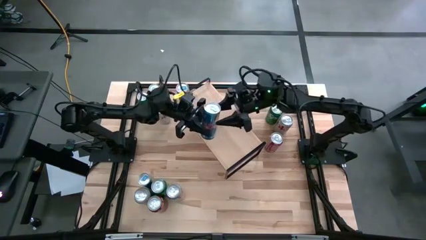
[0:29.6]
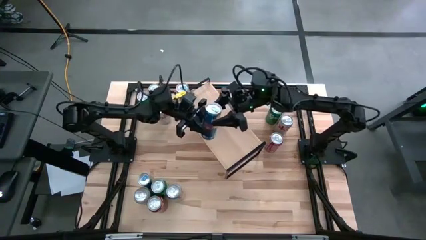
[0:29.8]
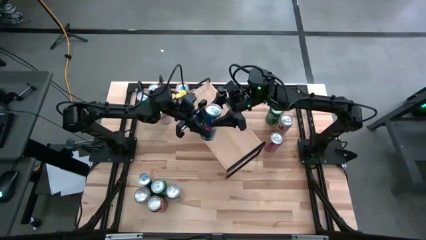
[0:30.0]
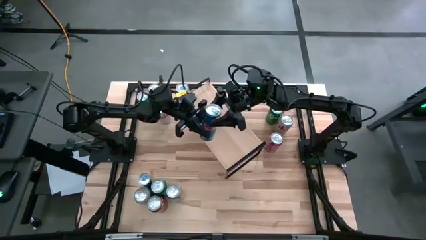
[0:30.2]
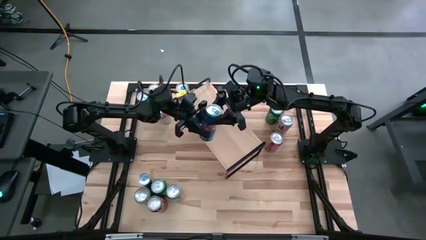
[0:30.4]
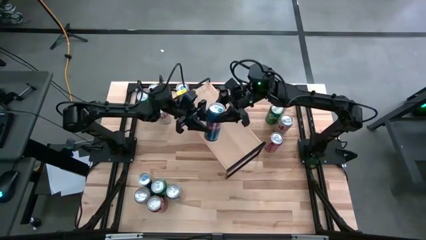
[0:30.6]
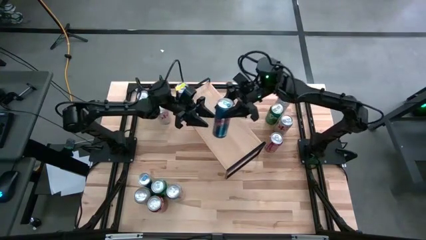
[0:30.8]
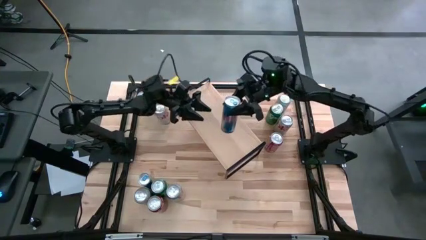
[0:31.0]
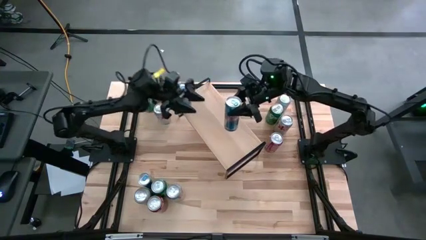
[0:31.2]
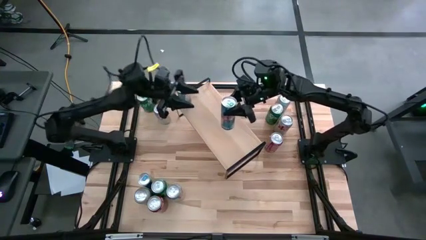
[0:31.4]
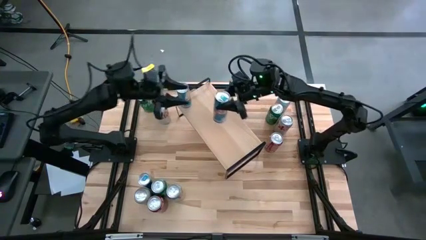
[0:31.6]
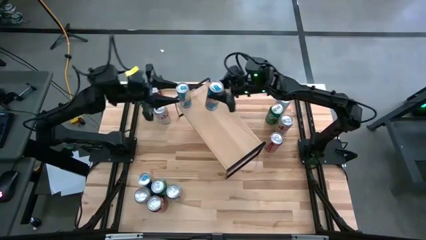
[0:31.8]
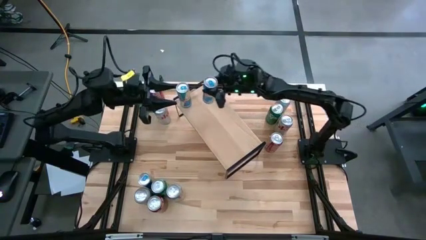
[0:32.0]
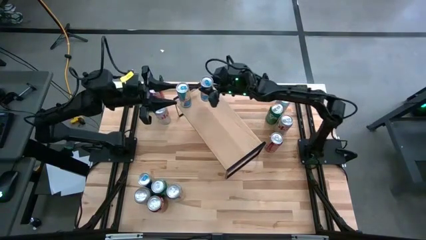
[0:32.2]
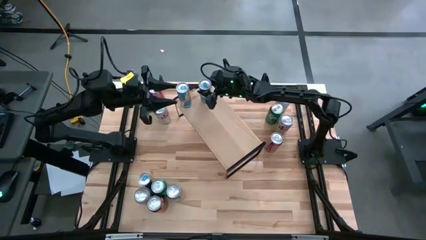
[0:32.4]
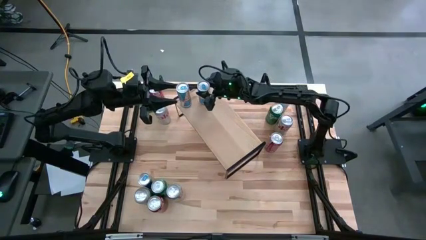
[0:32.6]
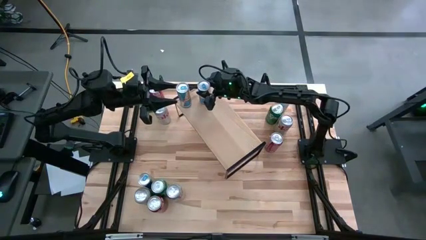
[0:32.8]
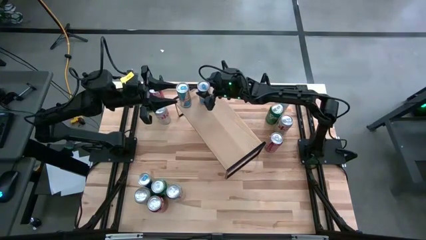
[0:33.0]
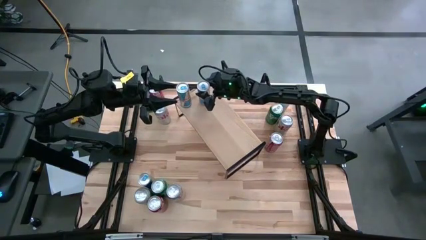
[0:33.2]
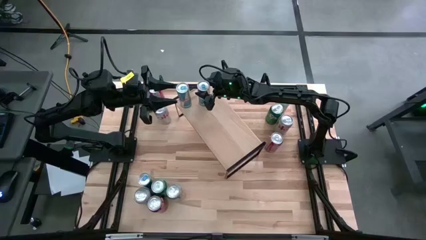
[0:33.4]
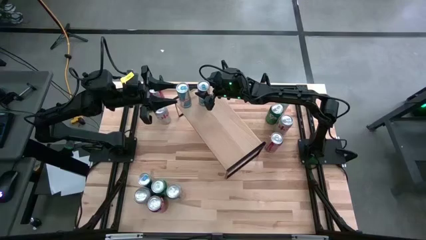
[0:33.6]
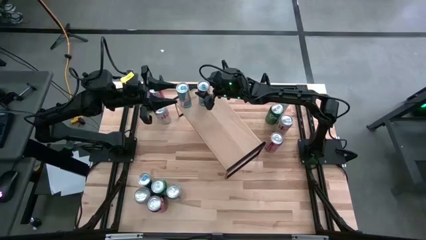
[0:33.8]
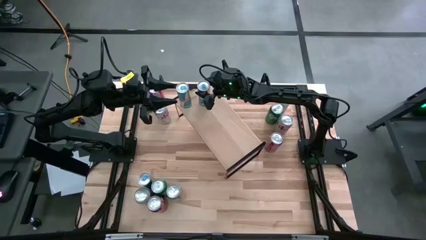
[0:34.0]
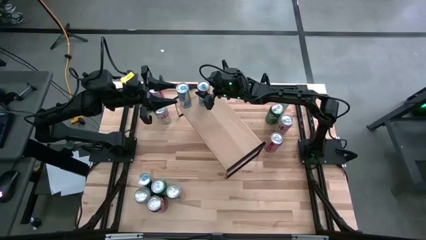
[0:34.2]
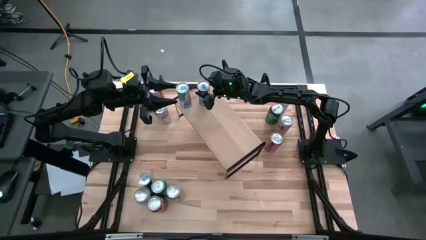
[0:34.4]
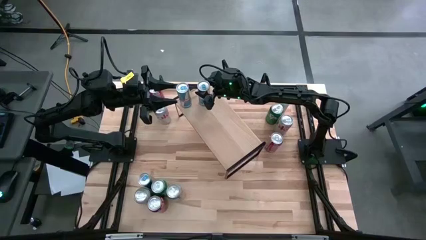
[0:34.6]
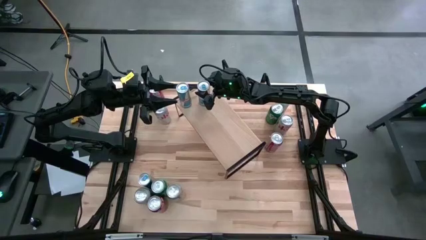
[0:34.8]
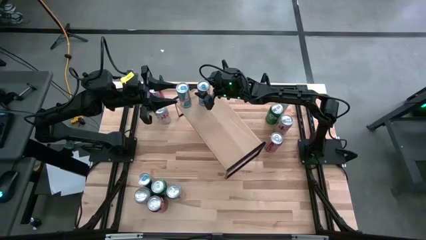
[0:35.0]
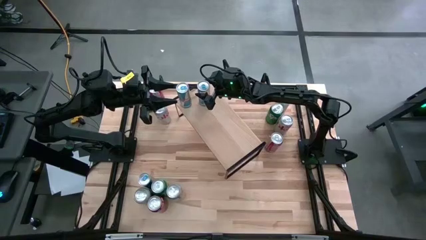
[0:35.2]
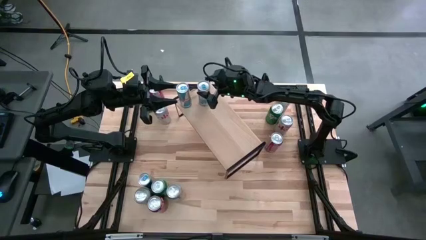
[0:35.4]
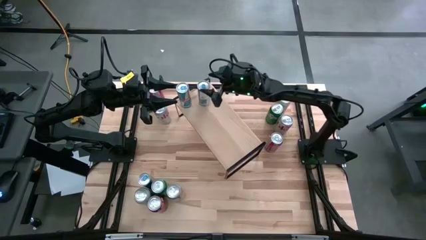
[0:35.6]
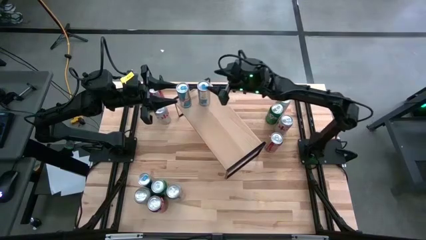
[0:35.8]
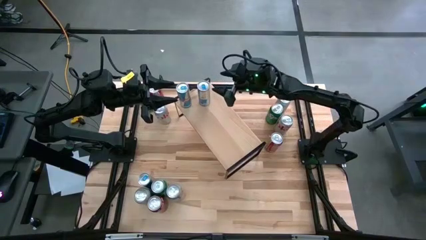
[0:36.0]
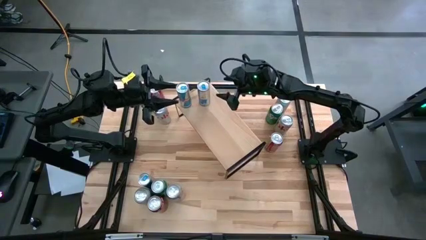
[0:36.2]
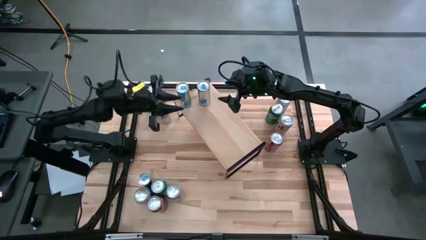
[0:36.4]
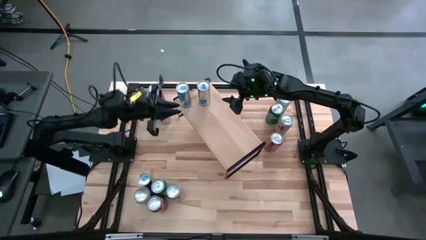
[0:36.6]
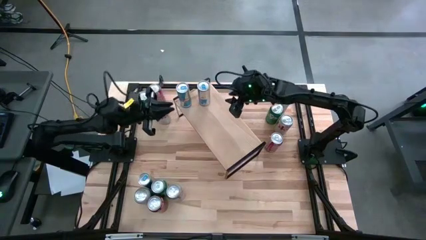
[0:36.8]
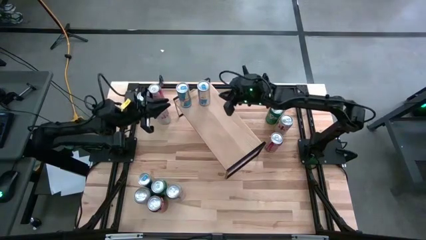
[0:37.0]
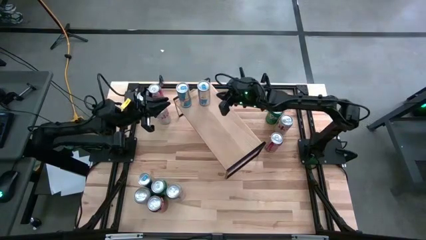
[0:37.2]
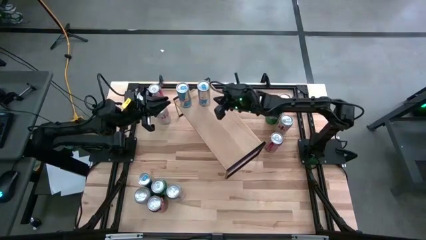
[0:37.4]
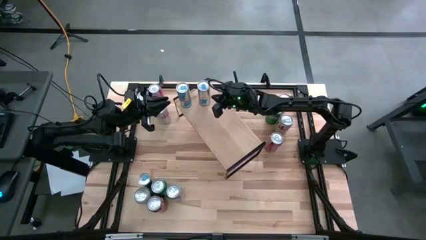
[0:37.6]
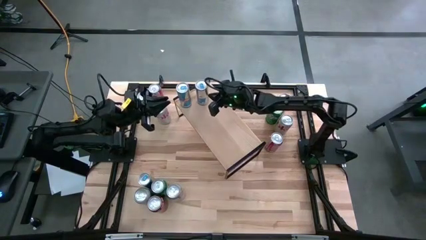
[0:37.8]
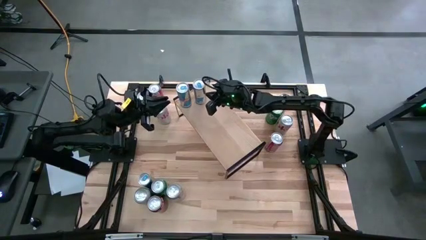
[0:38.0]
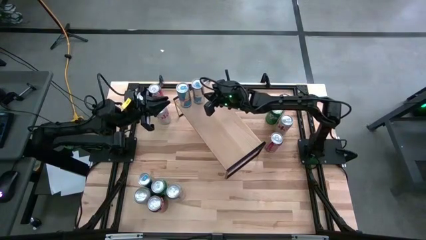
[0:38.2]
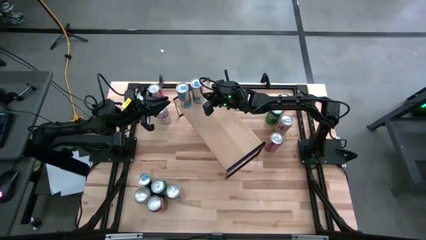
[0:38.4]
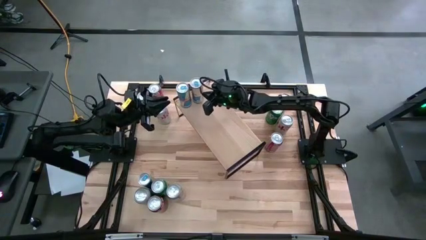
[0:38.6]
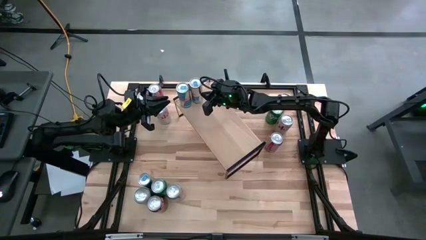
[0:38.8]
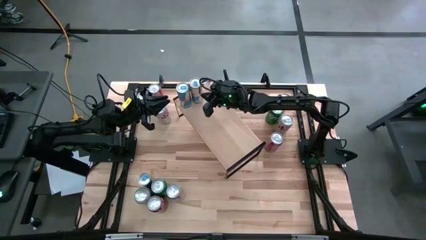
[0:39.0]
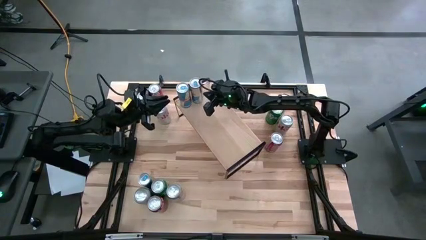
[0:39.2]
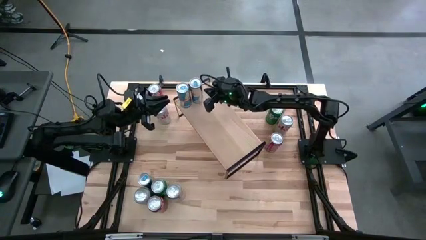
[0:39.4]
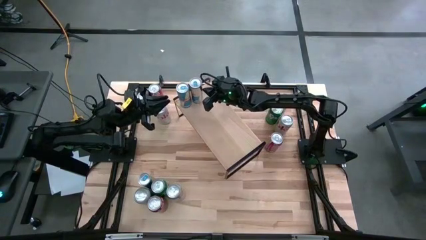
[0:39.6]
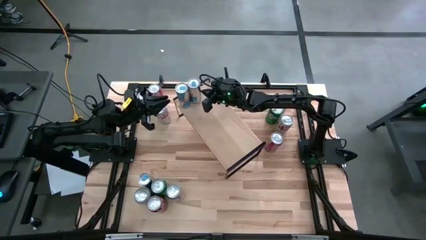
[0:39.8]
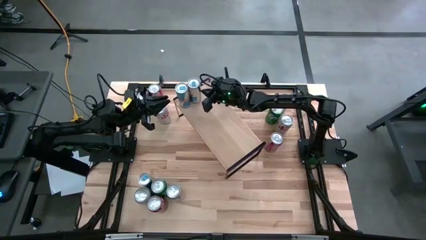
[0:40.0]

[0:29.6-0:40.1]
Task: Place canned beverage on shelf
Put the top blue soda can on the shelf aligned with the other blue soda can
